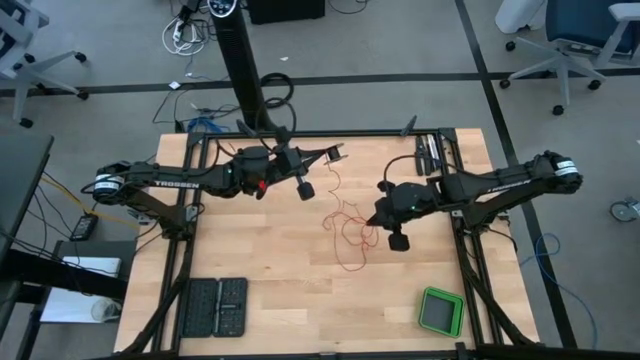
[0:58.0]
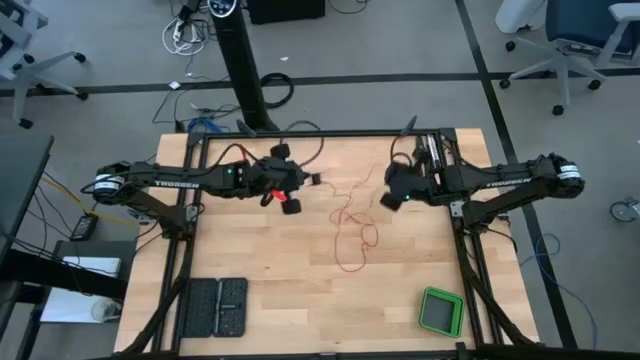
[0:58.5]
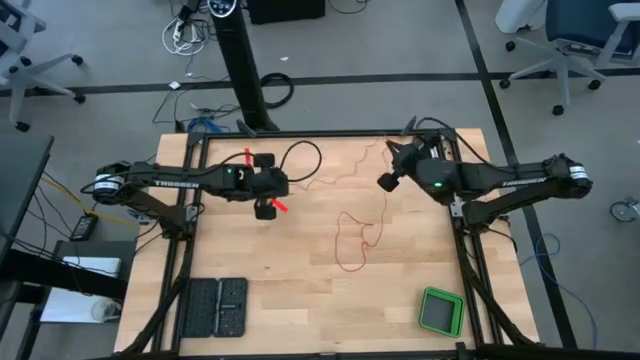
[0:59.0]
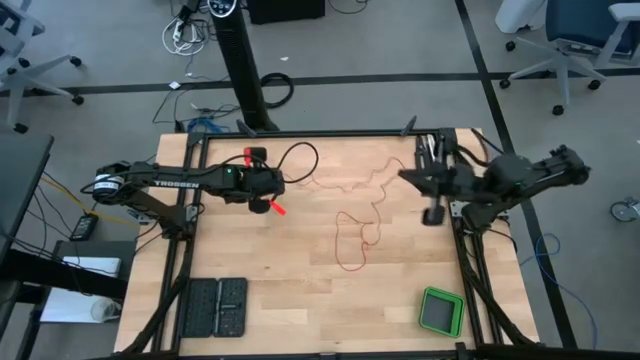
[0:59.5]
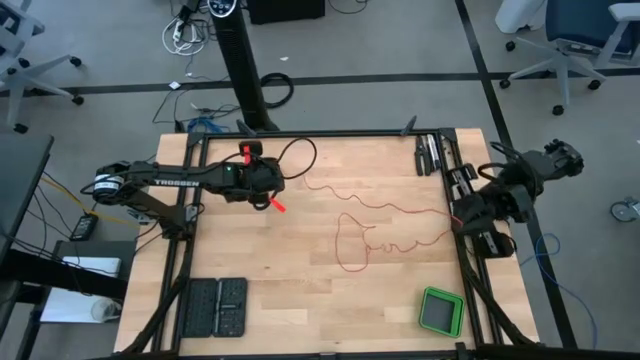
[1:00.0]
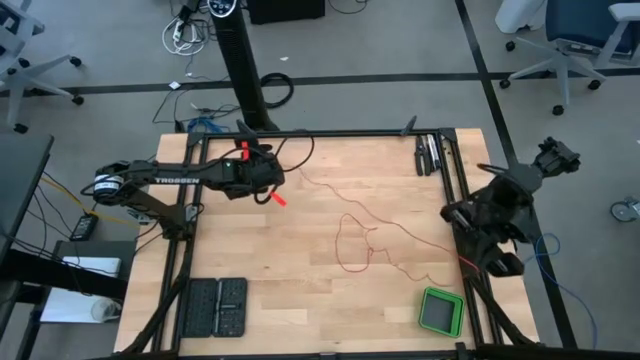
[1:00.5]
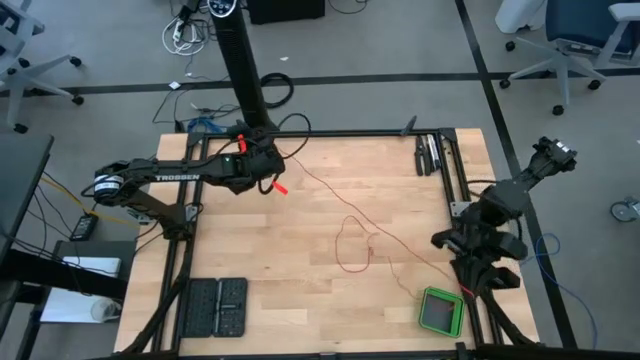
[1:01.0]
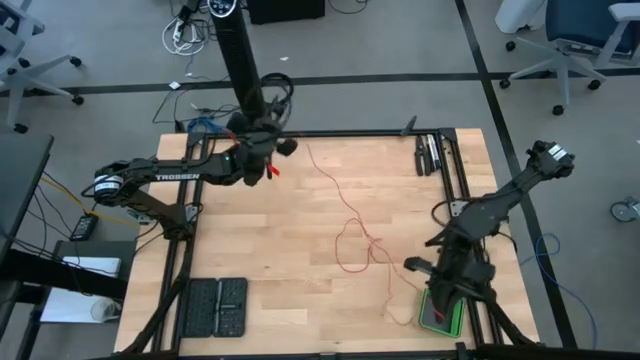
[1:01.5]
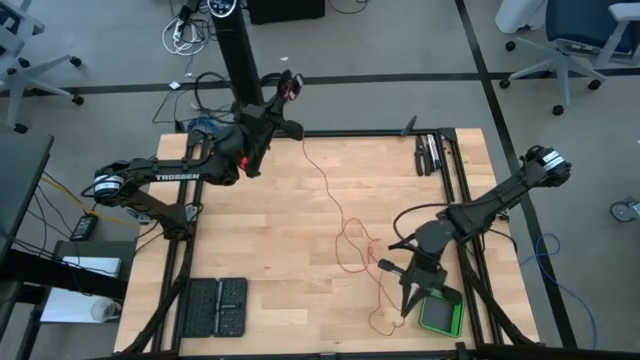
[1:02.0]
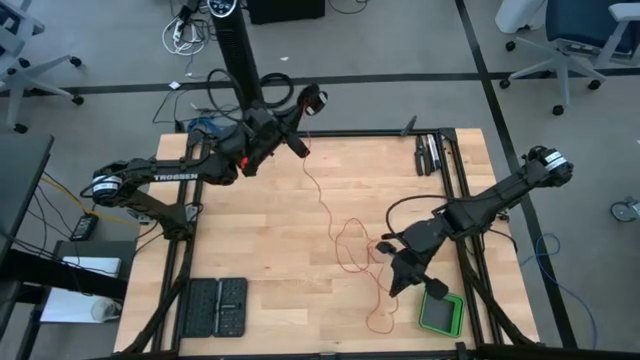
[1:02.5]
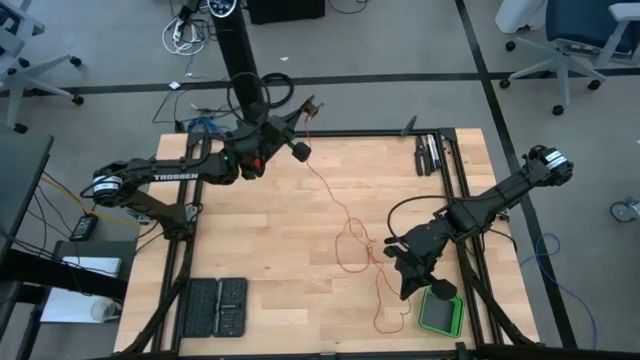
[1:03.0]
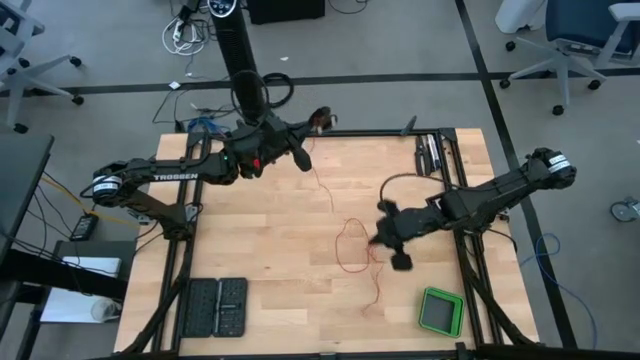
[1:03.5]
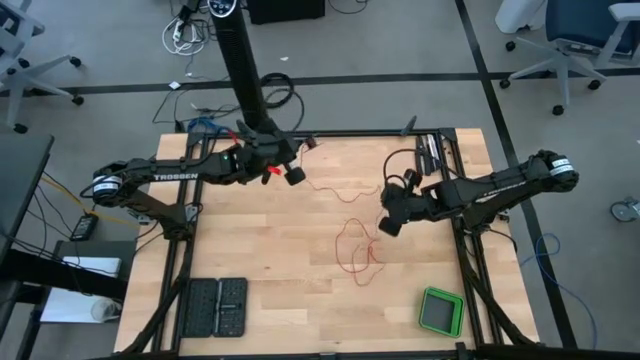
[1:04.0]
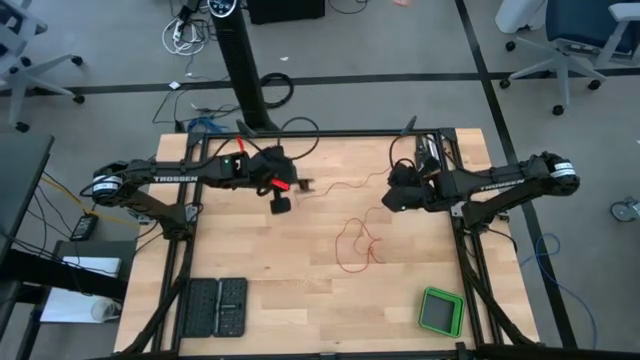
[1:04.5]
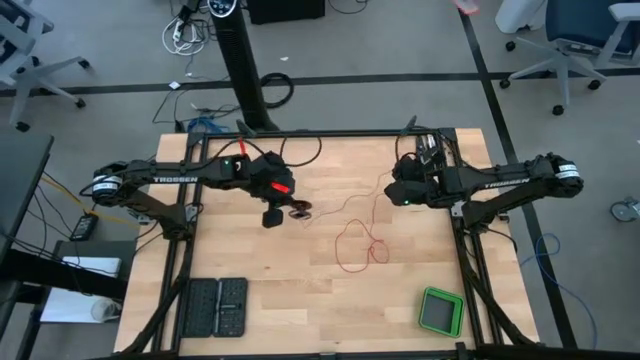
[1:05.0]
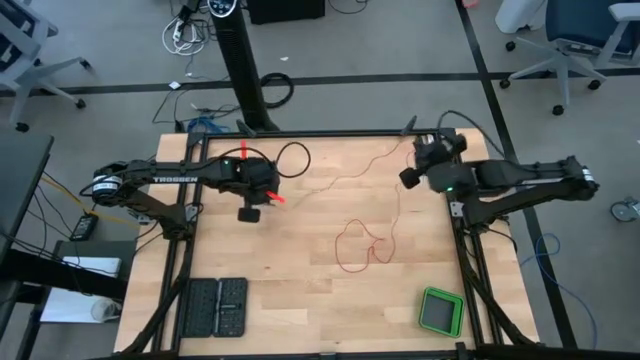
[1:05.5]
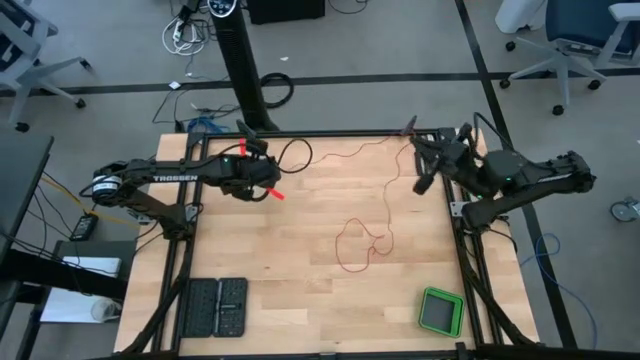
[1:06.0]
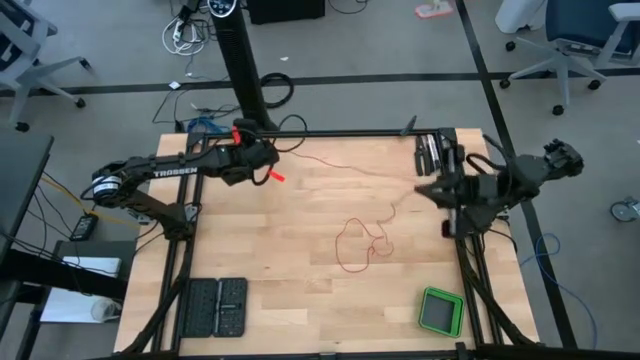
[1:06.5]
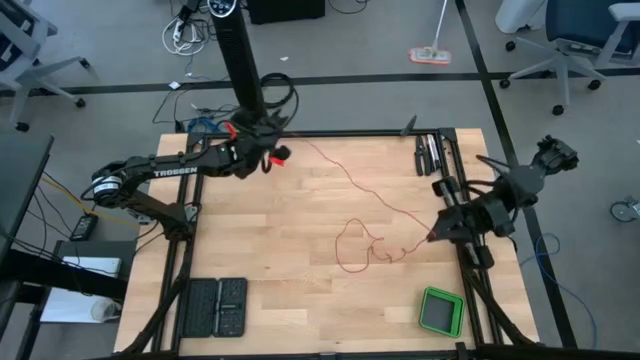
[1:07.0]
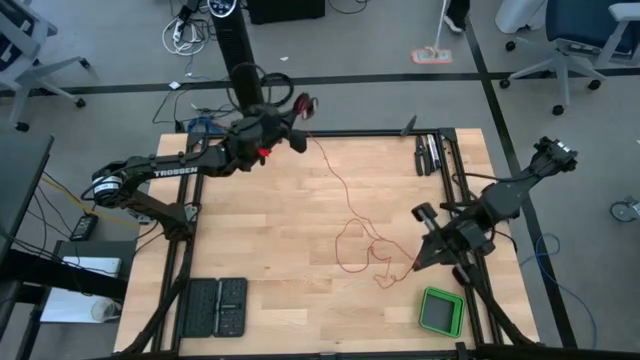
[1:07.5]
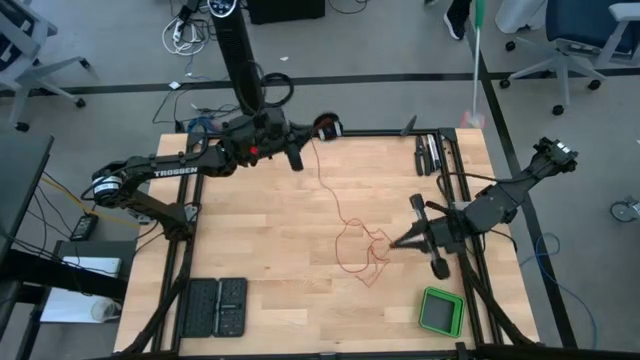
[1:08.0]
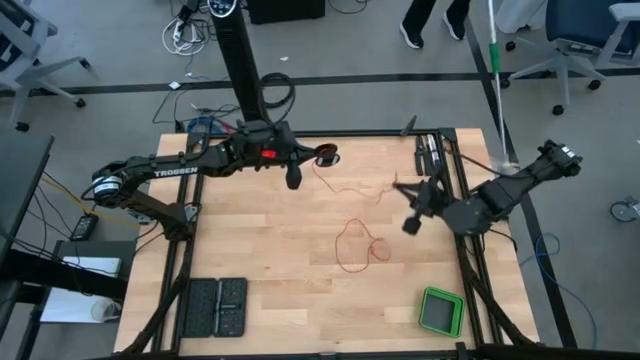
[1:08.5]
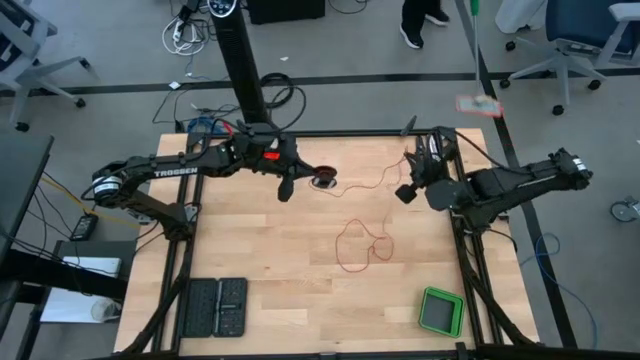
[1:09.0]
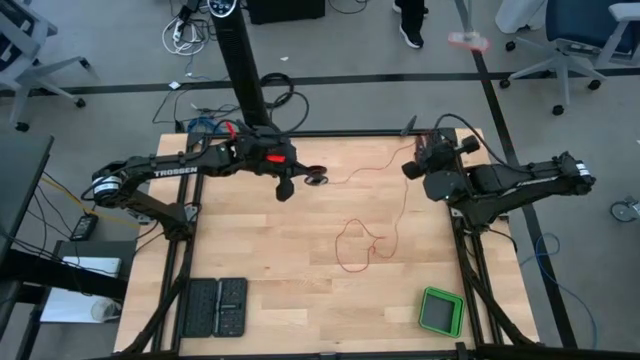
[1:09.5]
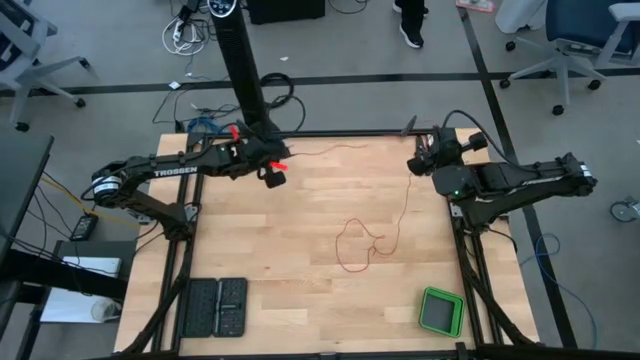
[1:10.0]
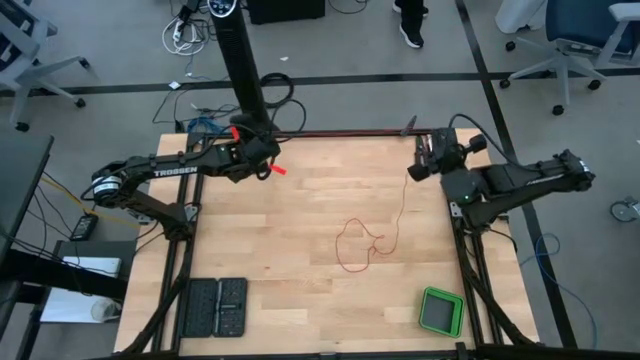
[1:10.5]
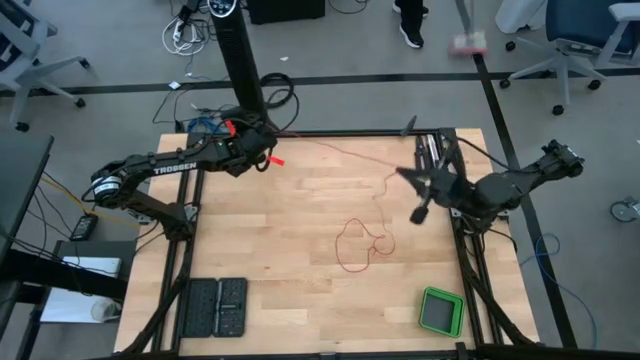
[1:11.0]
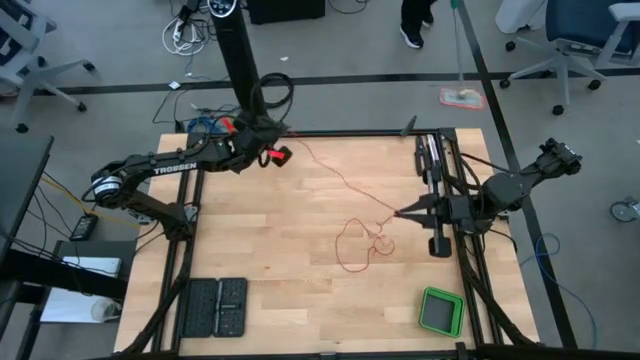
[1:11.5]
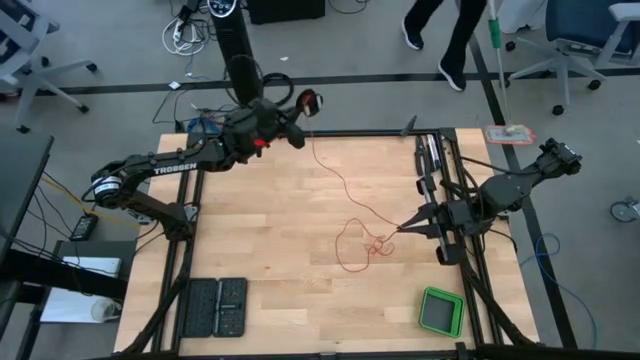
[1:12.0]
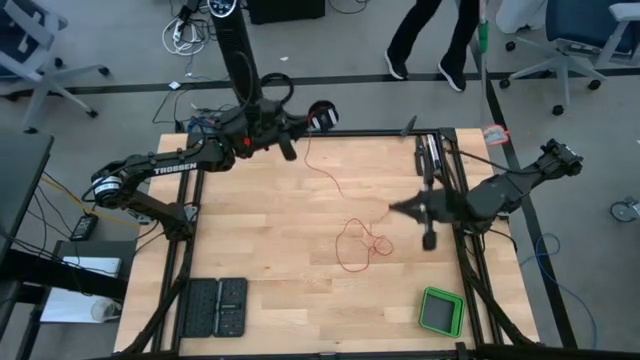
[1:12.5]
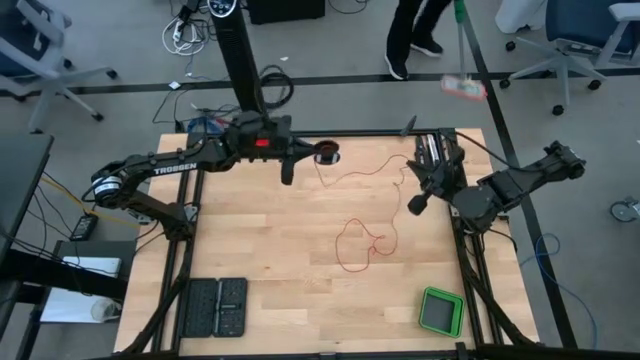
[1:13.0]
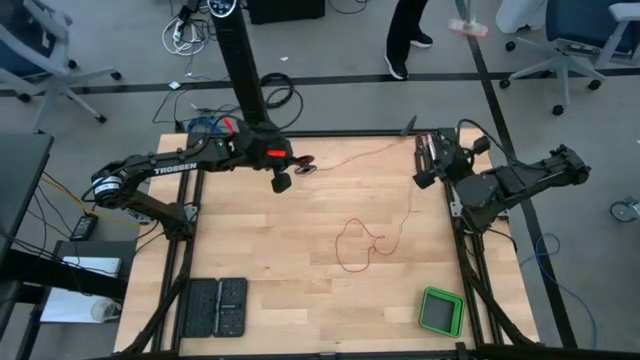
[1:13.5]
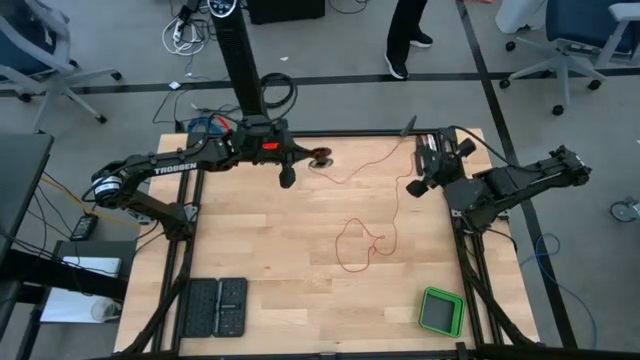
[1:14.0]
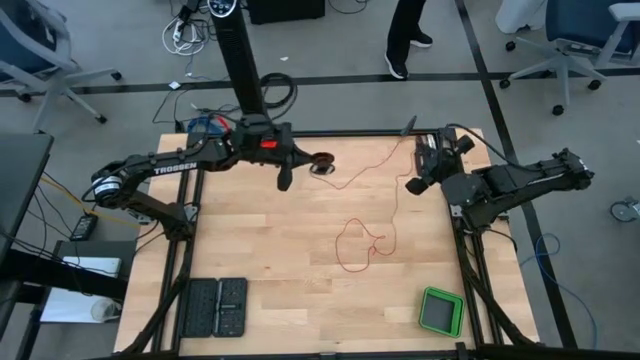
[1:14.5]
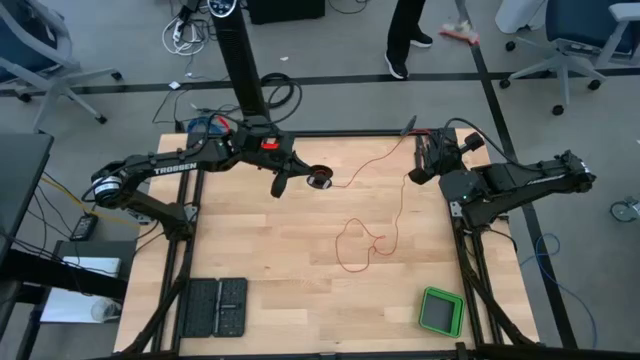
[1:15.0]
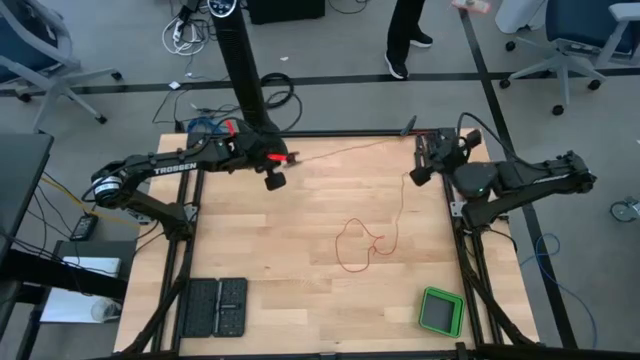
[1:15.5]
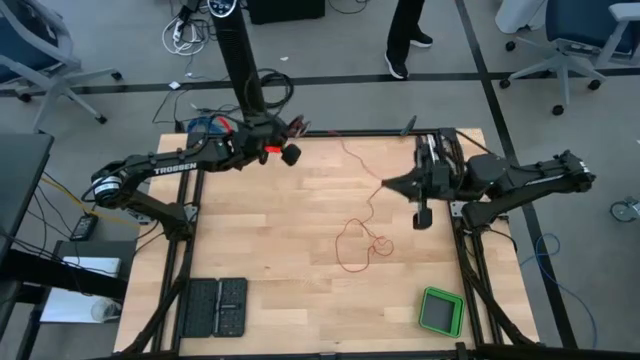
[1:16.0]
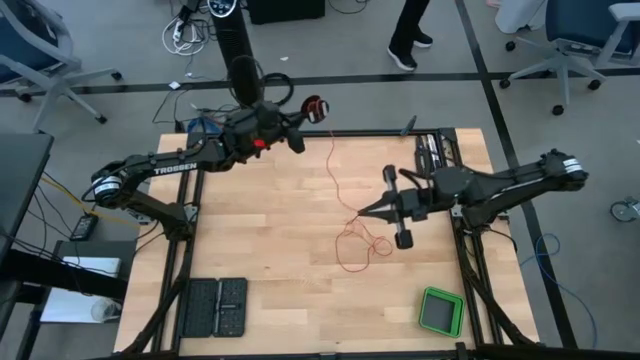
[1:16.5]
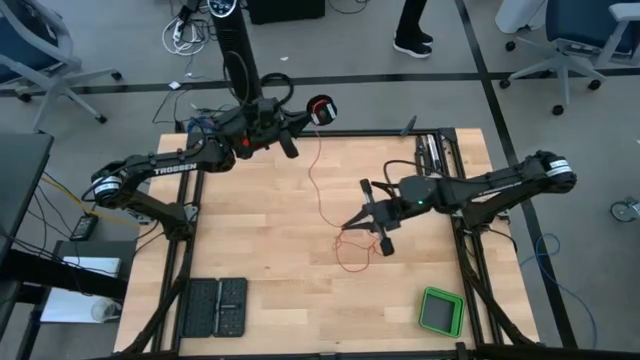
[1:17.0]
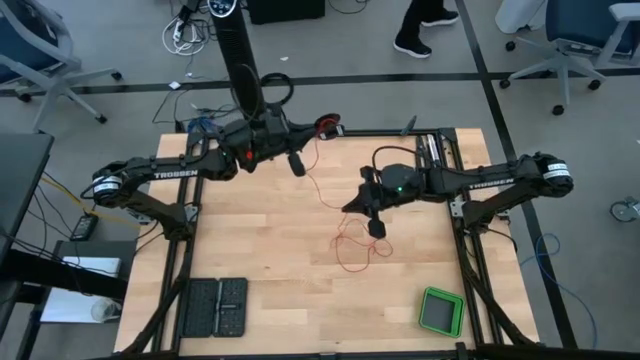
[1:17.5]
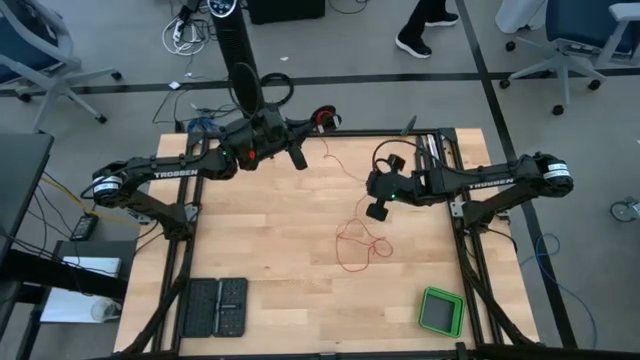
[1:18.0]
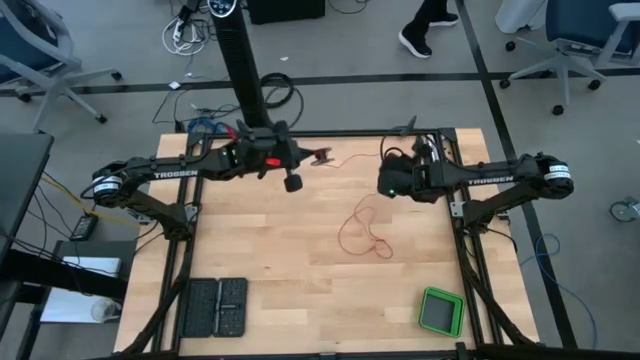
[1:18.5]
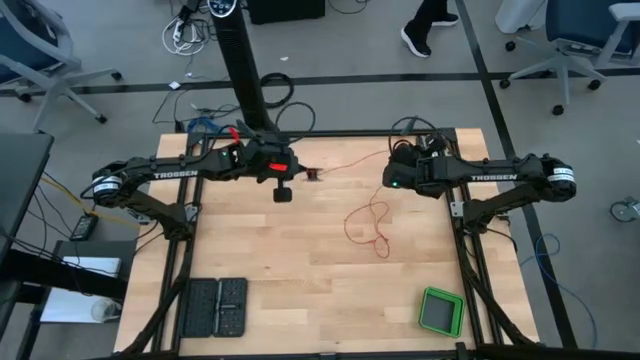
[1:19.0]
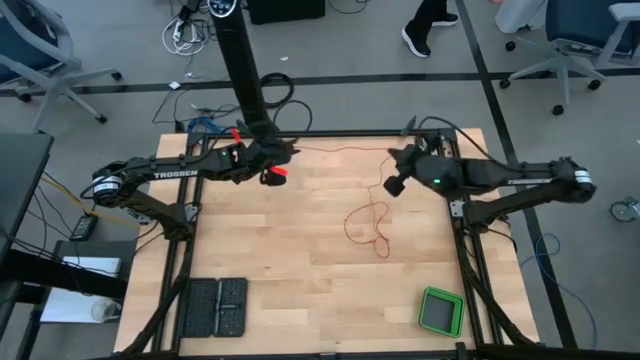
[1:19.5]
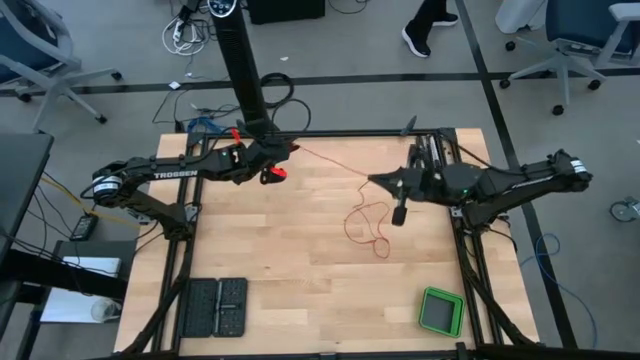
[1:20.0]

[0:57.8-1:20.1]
Task: Coil cords
Coil the red wire cable onto the black spool
